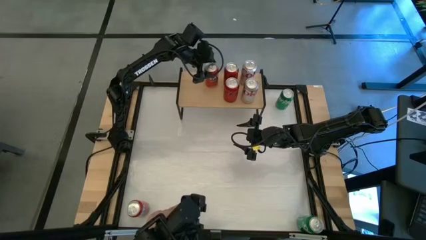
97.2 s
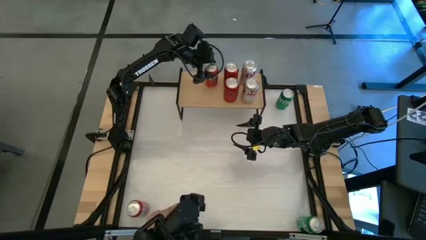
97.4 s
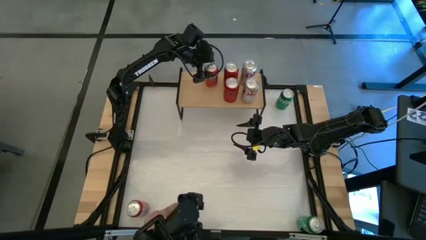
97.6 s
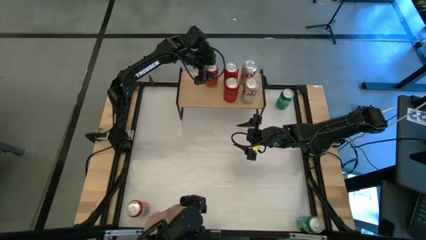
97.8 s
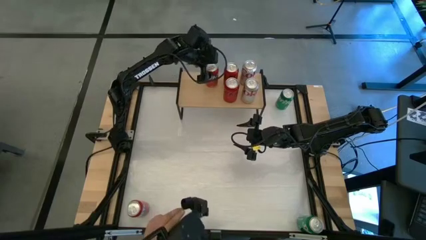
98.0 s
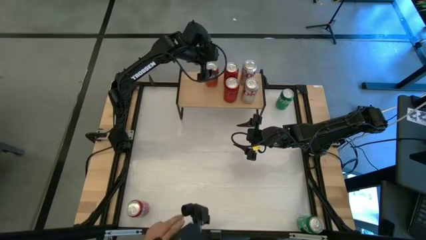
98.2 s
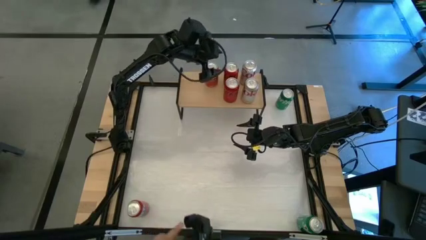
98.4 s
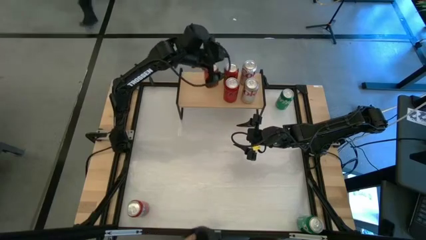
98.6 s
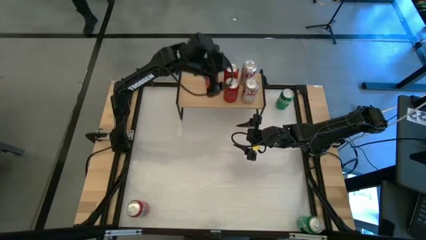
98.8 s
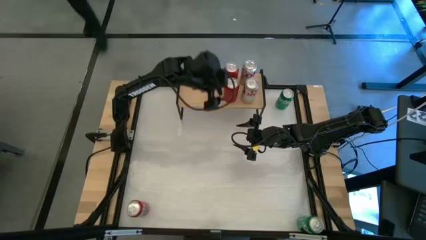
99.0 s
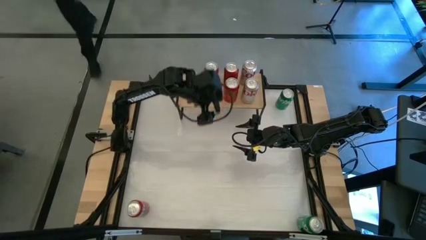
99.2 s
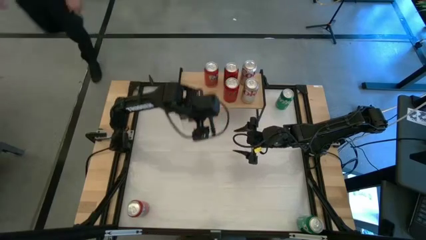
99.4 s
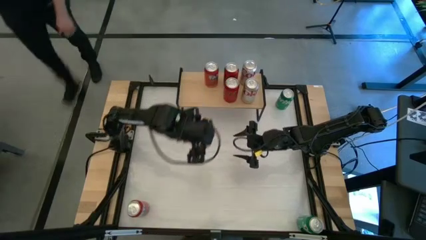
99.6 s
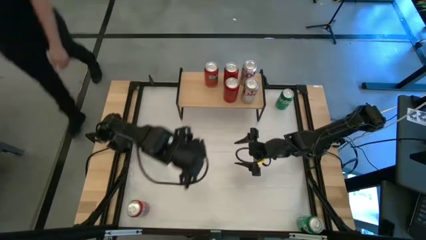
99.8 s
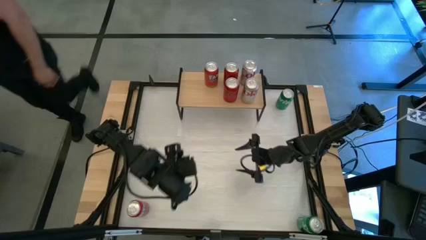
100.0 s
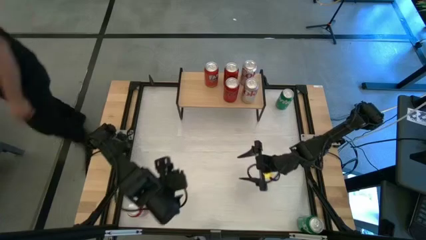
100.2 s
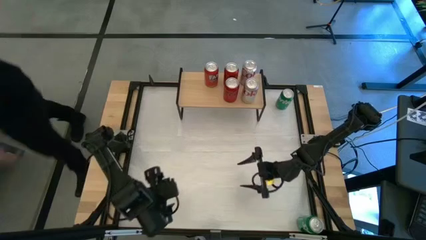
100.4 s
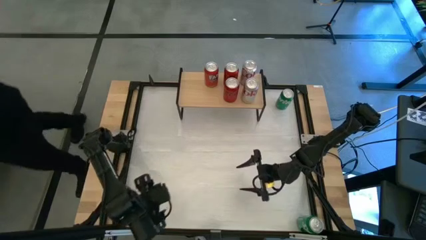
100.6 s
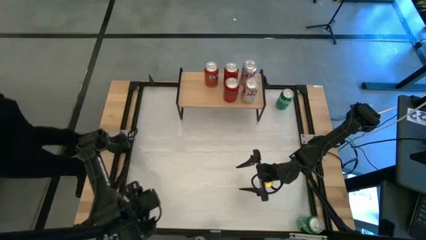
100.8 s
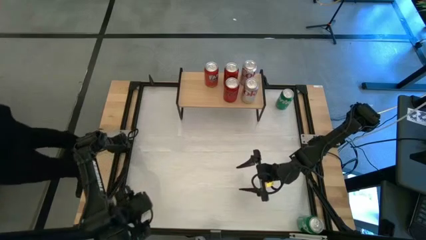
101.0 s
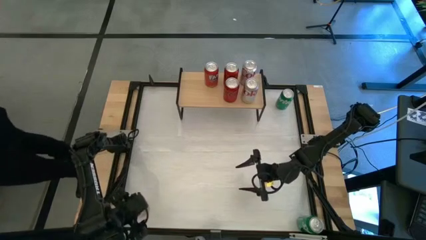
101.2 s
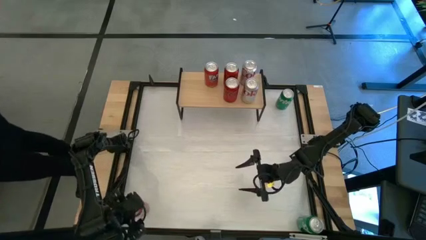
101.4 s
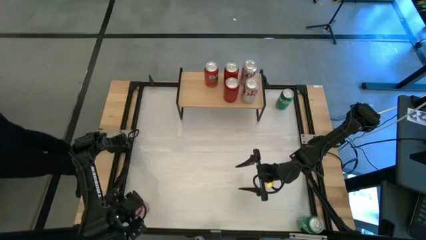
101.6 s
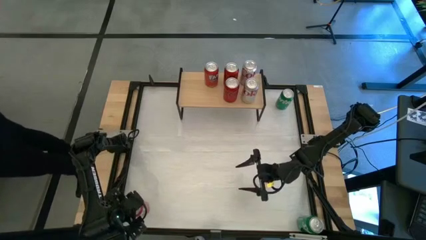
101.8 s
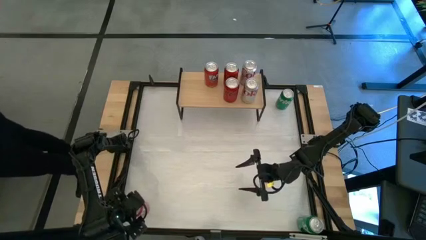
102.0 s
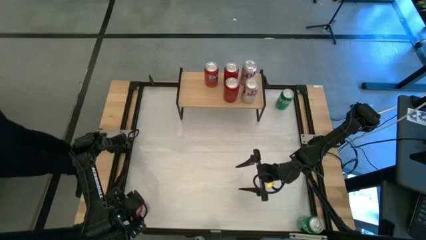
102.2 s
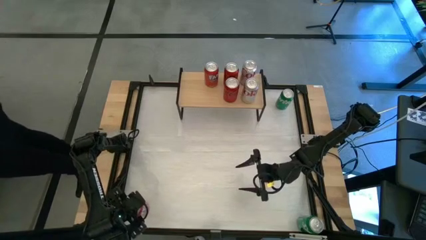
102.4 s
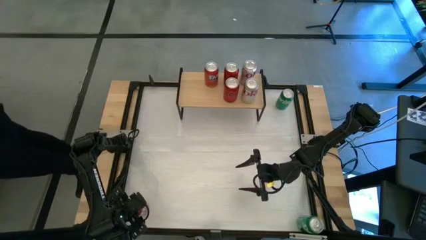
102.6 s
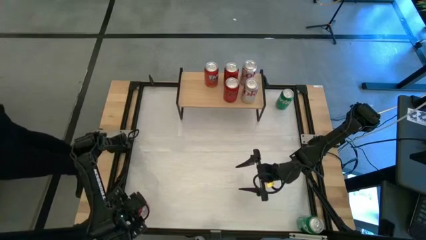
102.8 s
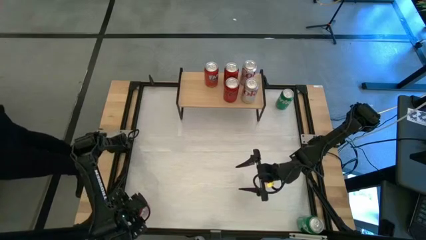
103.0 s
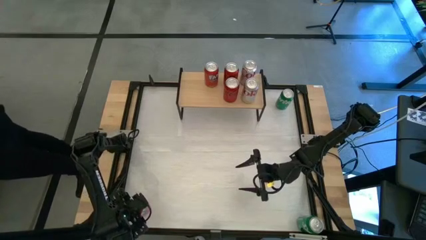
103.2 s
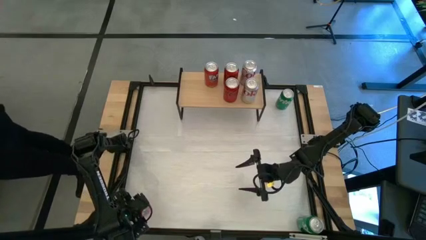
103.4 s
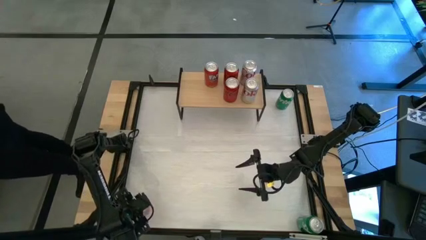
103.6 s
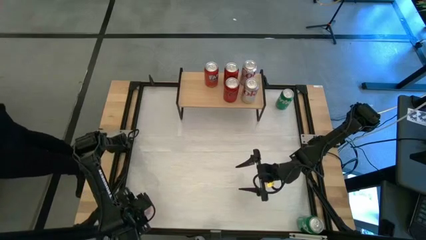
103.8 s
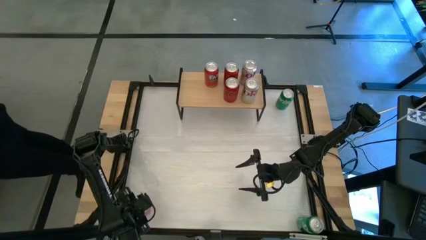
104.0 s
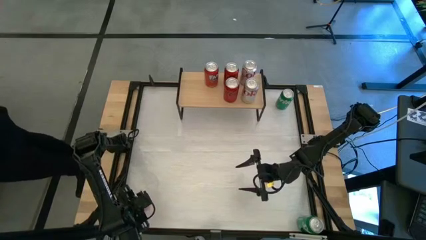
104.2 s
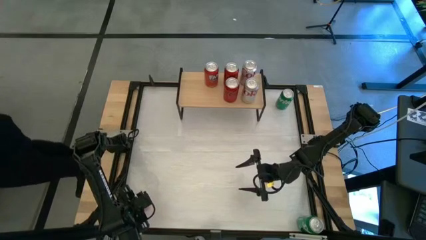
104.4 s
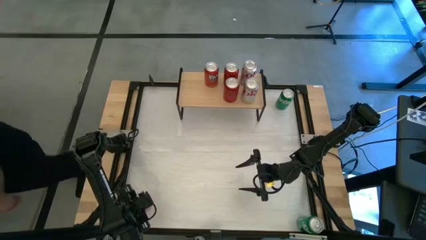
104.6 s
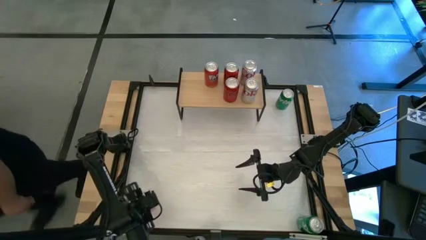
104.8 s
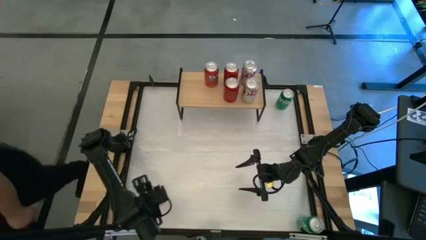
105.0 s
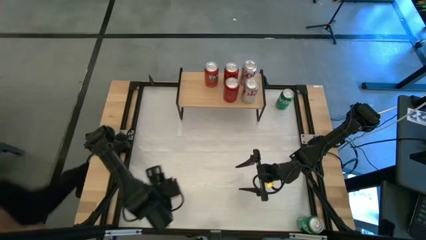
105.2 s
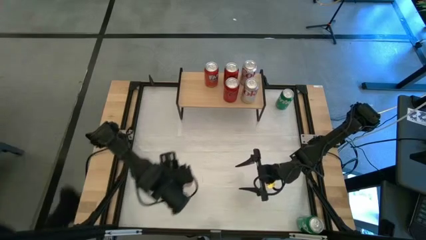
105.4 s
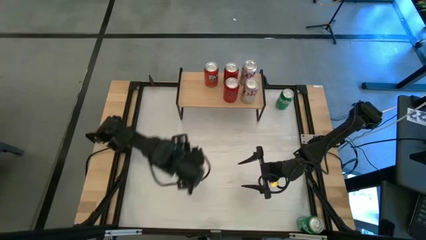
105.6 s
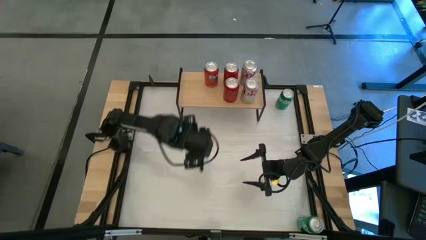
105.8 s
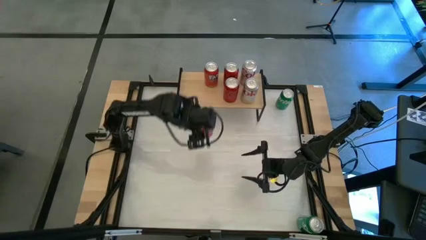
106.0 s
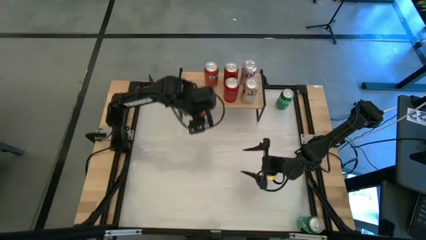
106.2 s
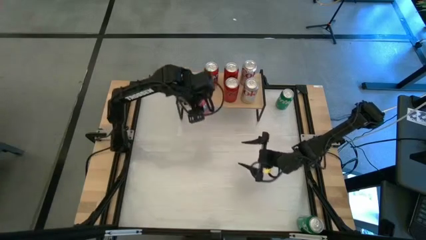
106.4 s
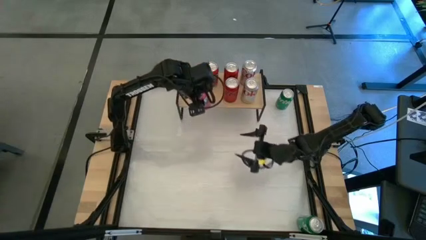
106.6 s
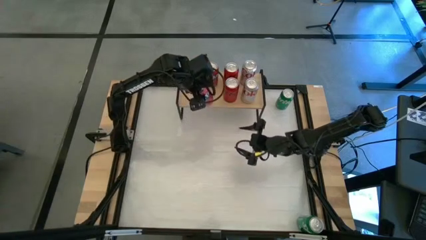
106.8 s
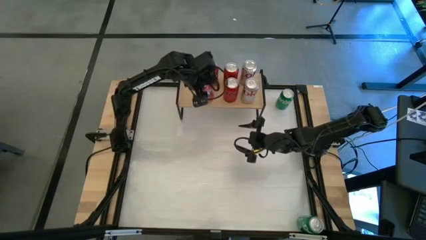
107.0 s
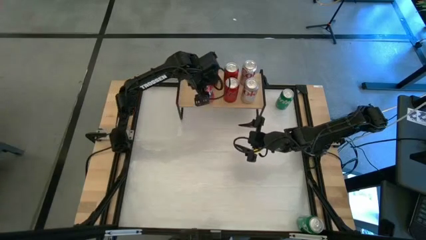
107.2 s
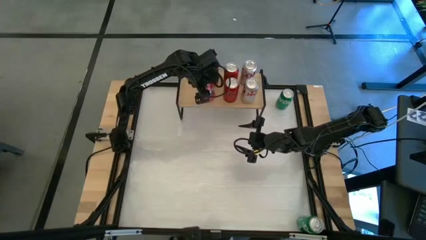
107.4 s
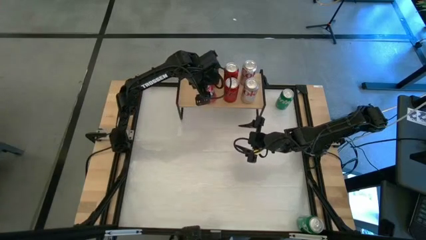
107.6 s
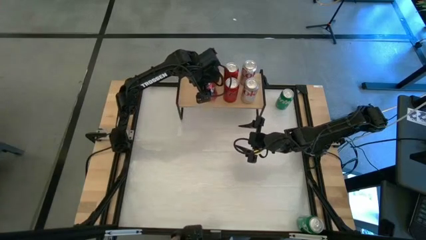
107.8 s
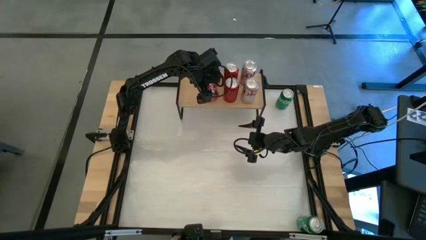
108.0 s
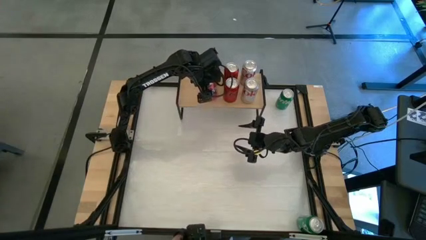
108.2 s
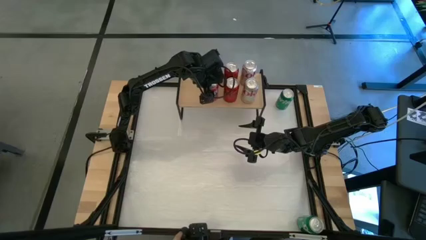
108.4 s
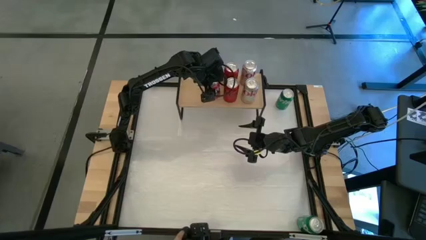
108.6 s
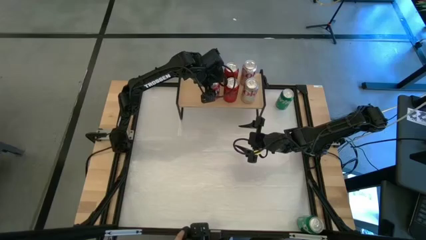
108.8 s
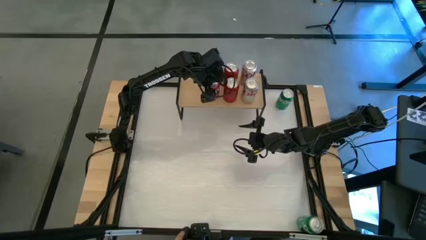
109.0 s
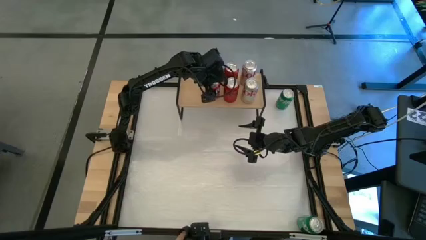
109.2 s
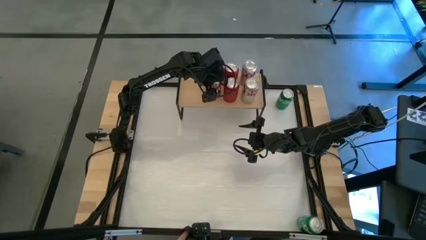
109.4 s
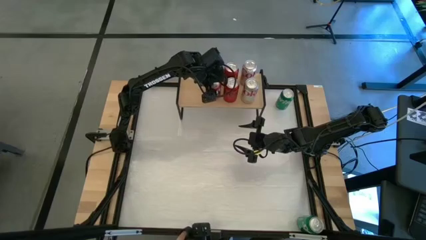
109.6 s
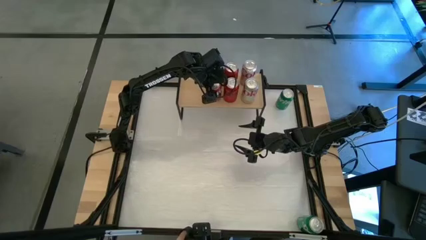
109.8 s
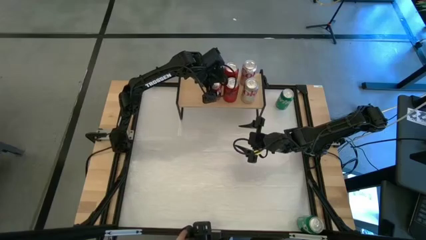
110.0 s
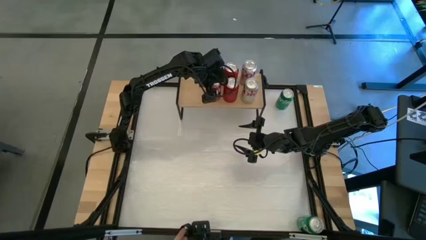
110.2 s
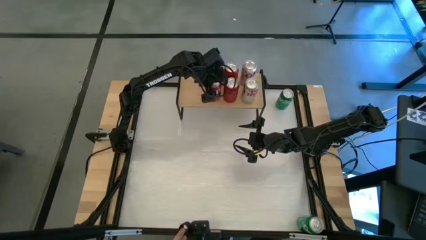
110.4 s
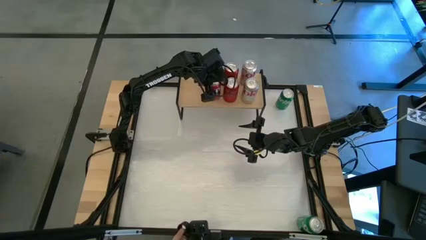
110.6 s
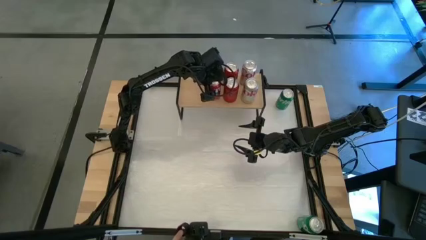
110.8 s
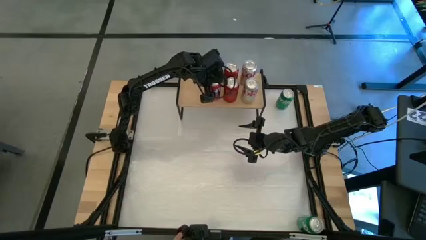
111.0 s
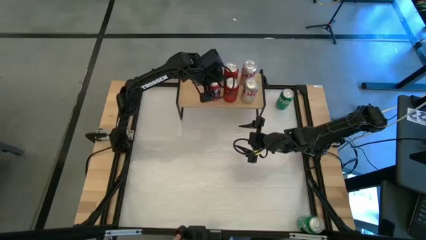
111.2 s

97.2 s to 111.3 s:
Task: Place canned beverage on shelf
Put the red soda can on the shelf aligned with the other red soda can

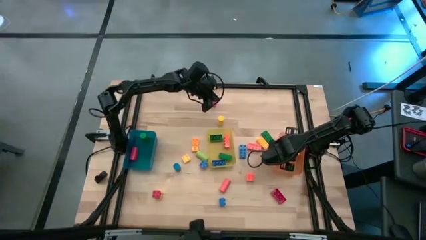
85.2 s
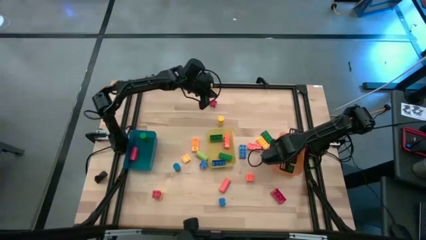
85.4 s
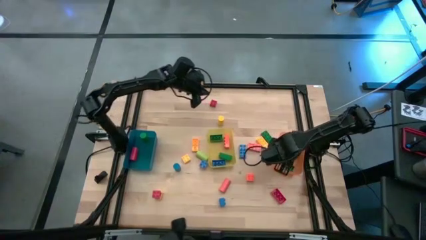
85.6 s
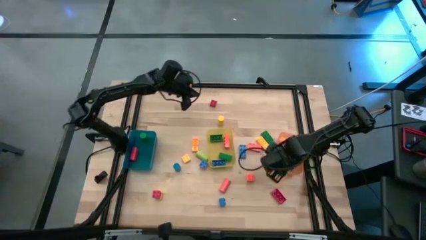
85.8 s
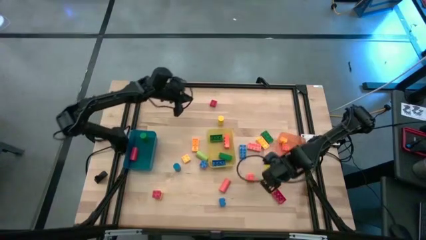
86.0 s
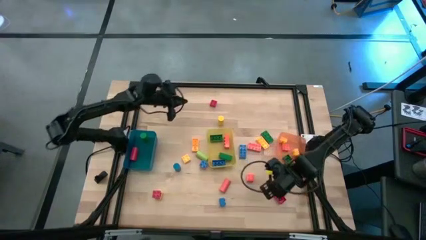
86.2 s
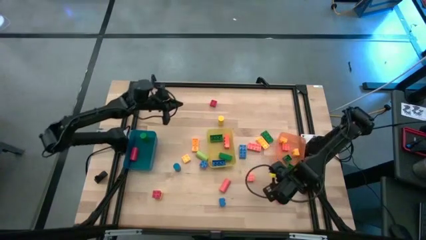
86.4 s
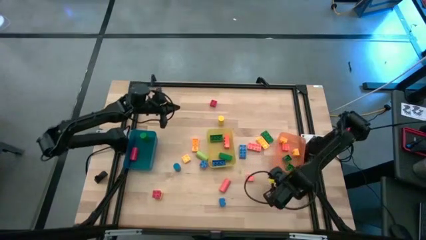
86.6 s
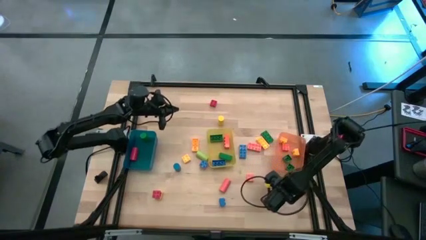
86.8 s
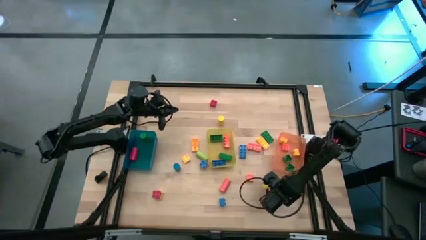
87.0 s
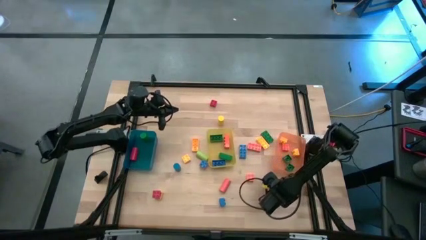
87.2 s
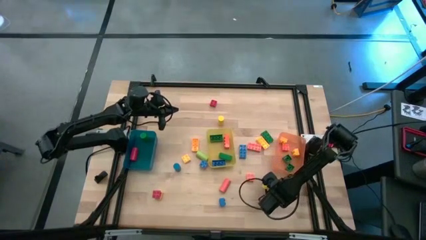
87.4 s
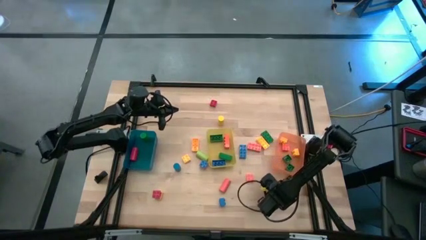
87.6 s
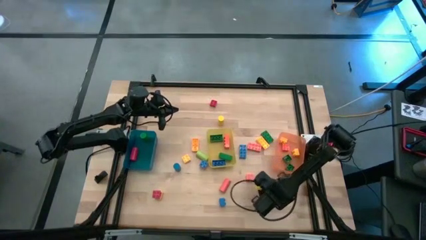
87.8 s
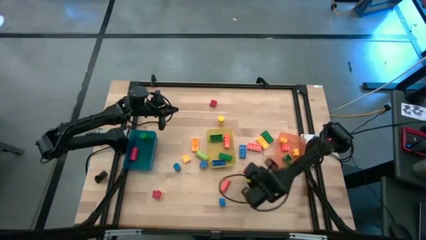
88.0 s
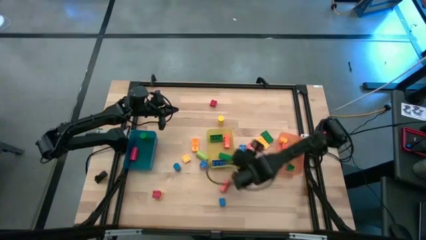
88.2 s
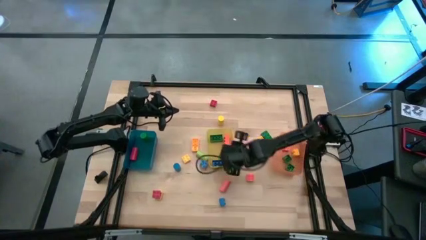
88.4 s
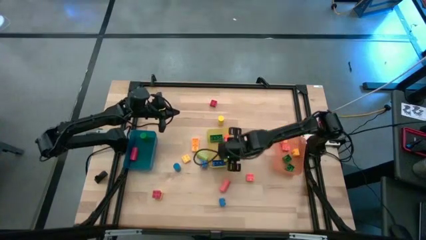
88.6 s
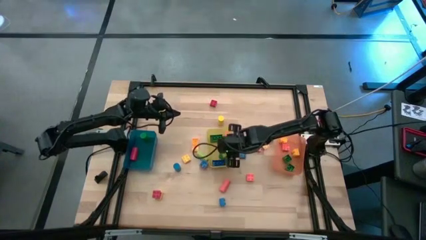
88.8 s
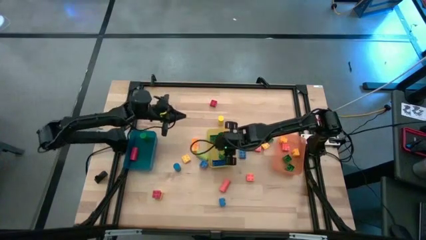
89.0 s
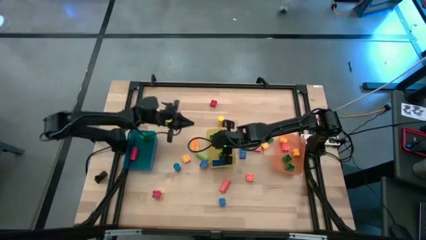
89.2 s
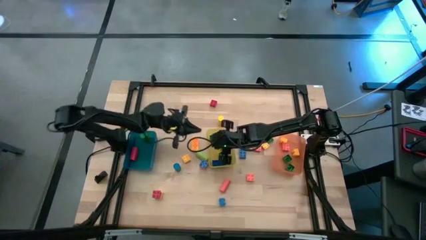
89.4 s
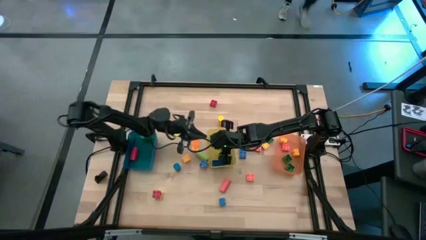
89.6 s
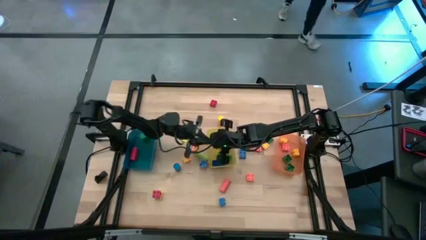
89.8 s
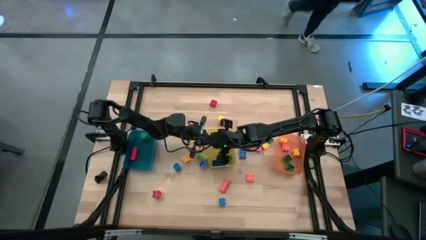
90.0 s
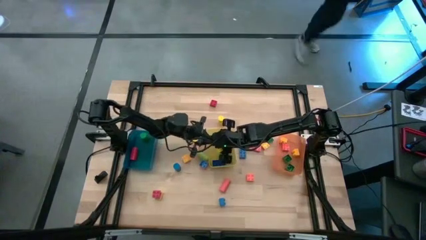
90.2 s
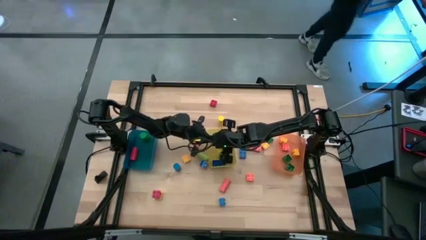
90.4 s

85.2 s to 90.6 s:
Task: Sort blocks by size
Put the red 8 stud game piece into the yellow bin
